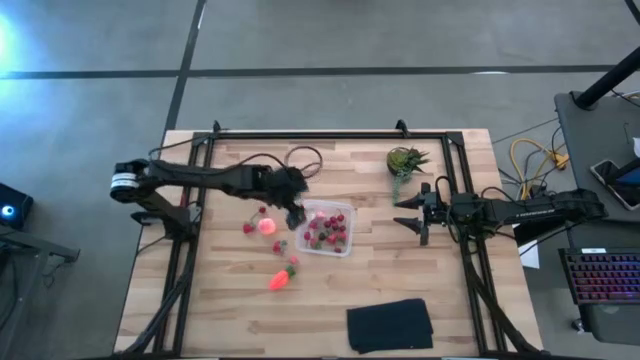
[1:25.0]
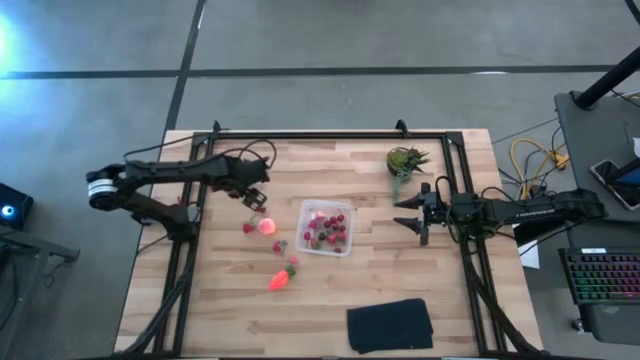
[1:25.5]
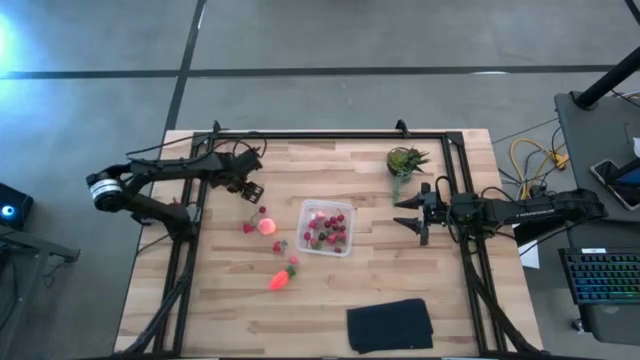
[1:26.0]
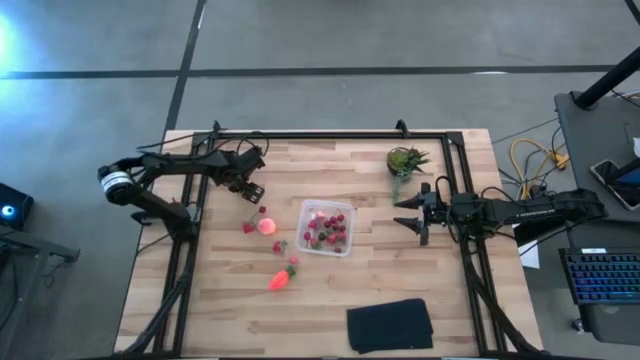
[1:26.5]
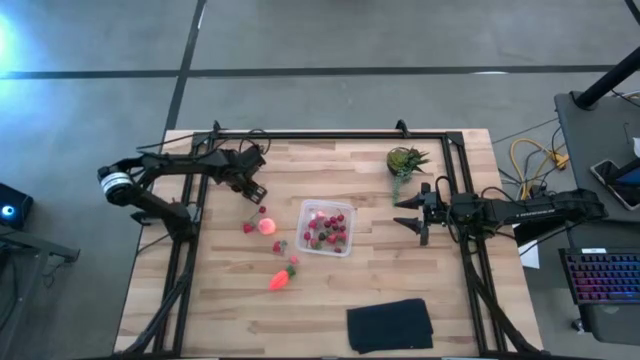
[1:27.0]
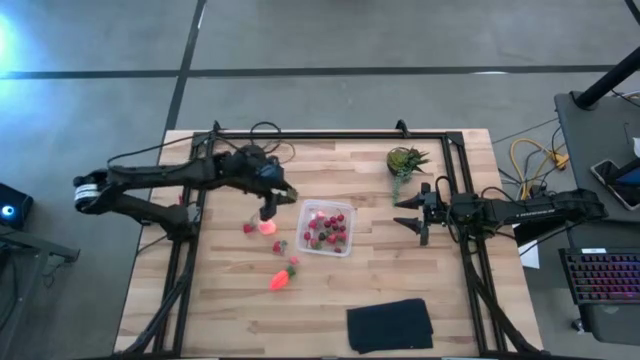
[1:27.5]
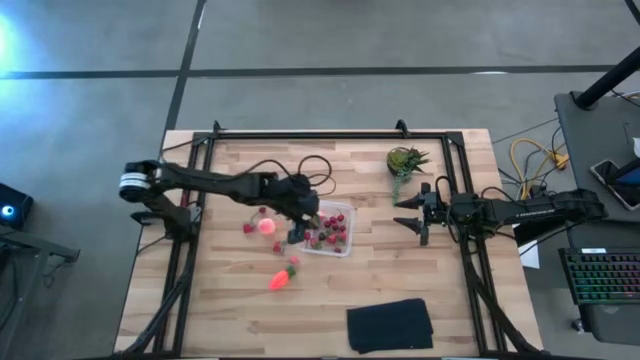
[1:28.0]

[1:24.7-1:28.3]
Task: Pick and placing Produce into tupperware
Put the red strawberry into the transparent bin

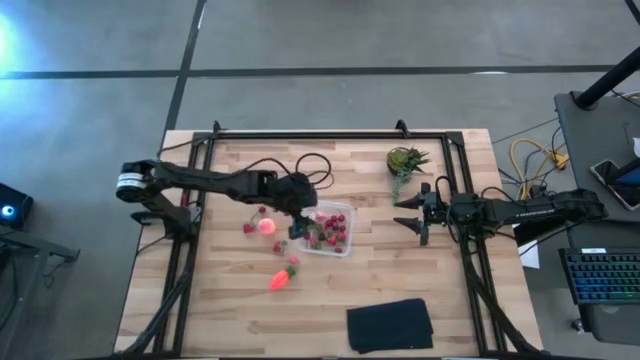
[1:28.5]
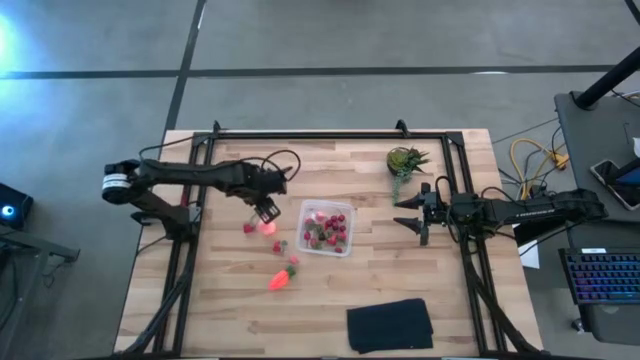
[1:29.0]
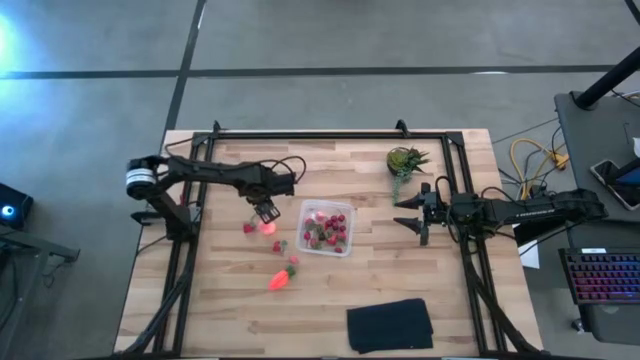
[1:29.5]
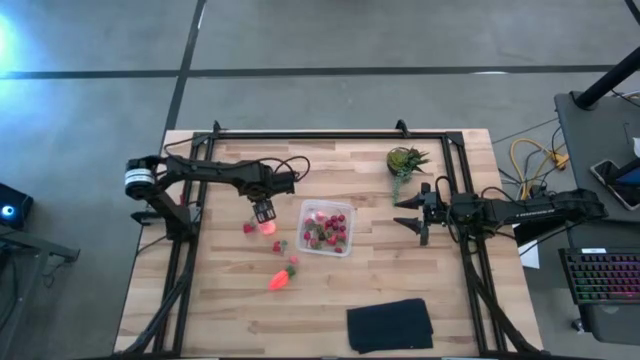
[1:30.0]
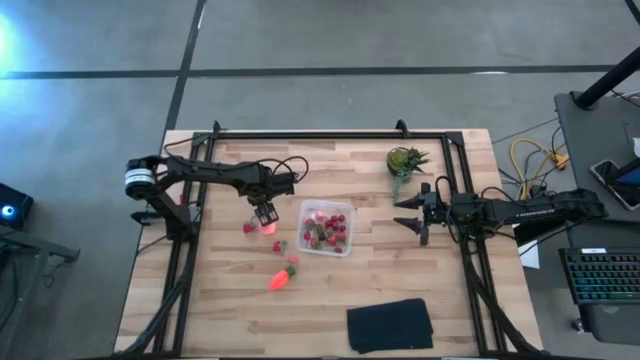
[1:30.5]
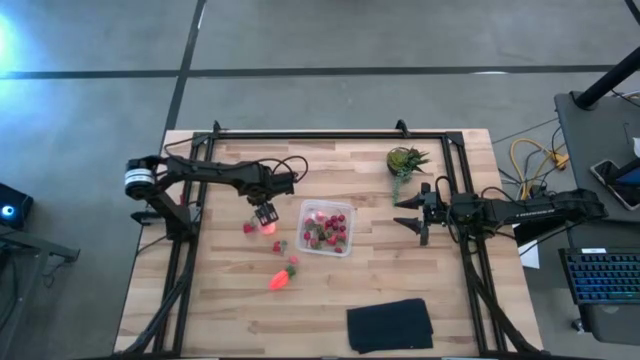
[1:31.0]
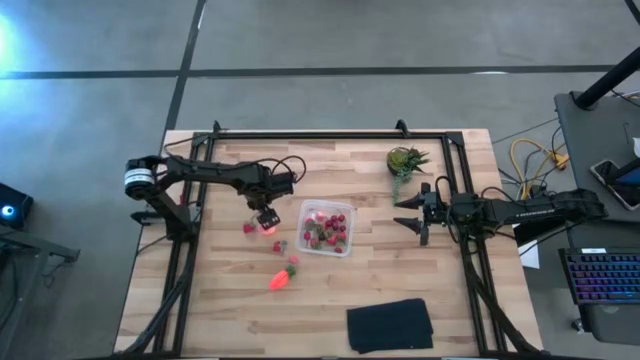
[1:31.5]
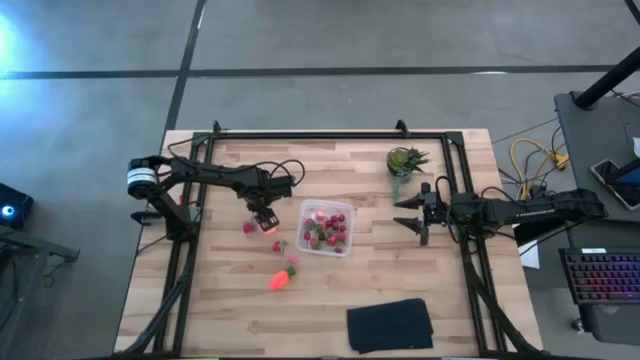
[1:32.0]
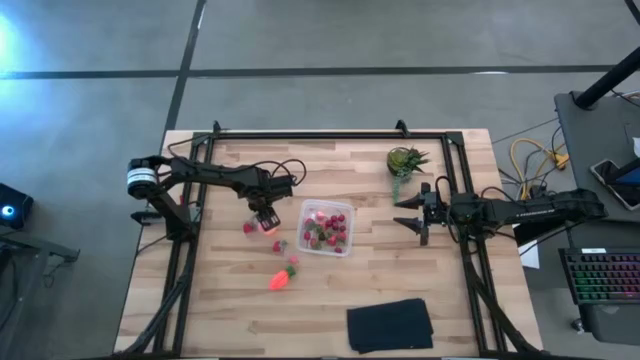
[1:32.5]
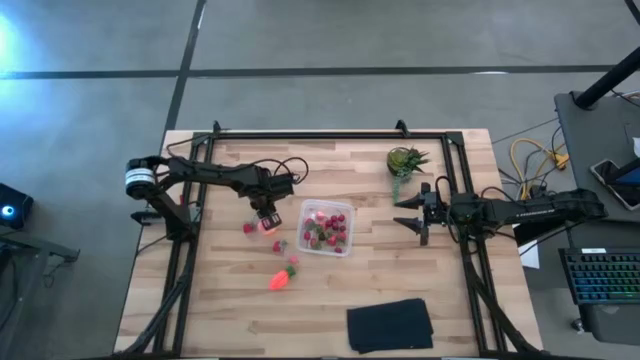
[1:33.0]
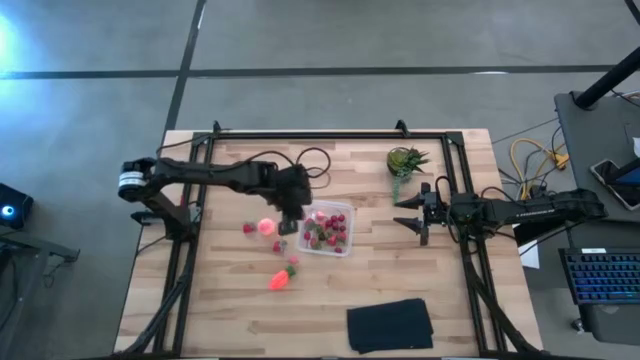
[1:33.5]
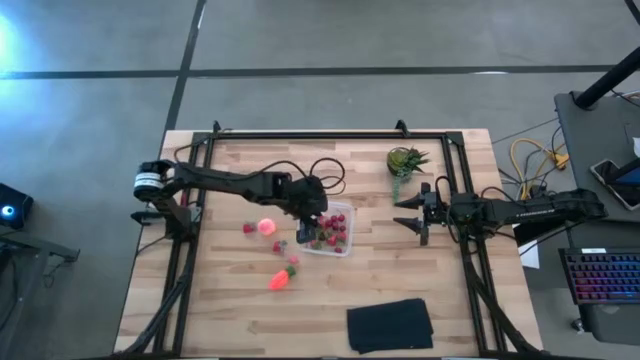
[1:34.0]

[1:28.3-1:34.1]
Put the red cherry into the transparent bin

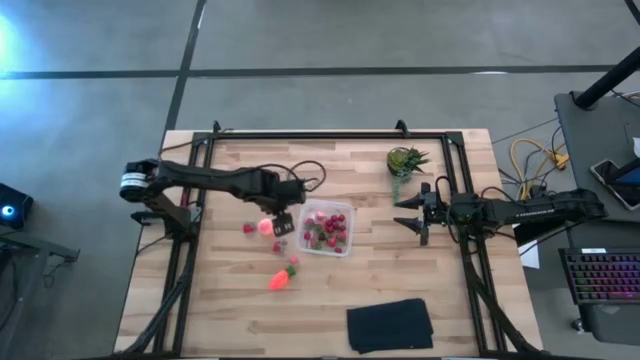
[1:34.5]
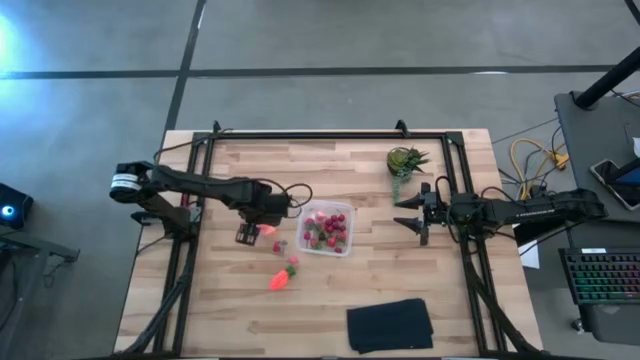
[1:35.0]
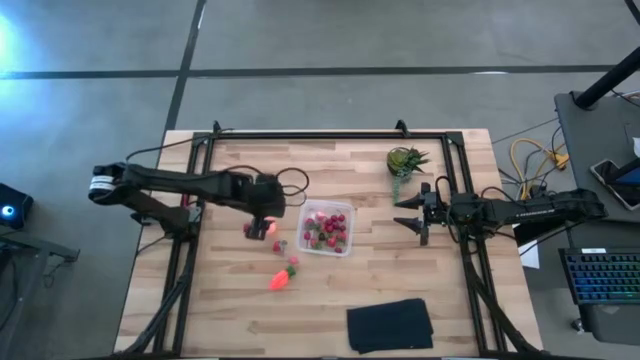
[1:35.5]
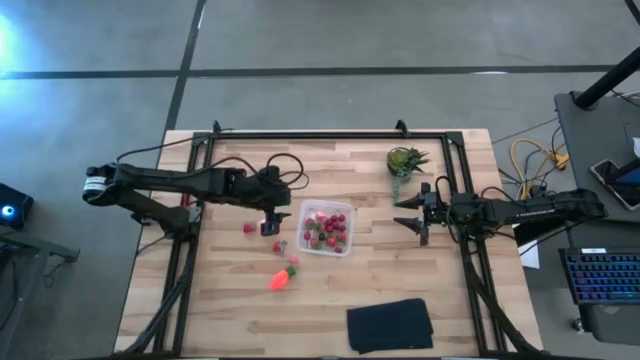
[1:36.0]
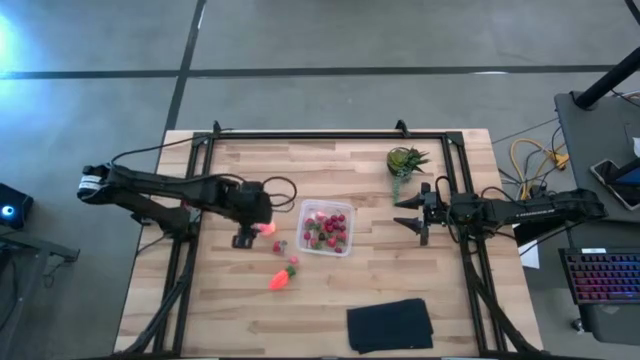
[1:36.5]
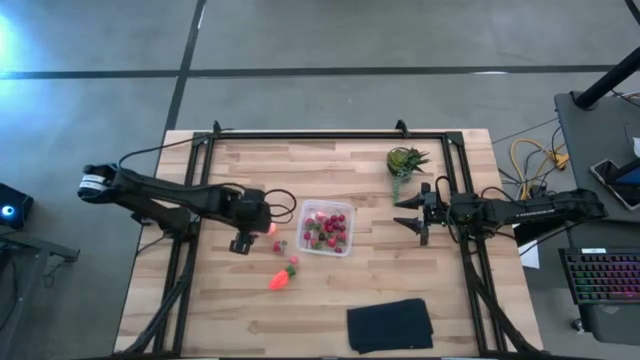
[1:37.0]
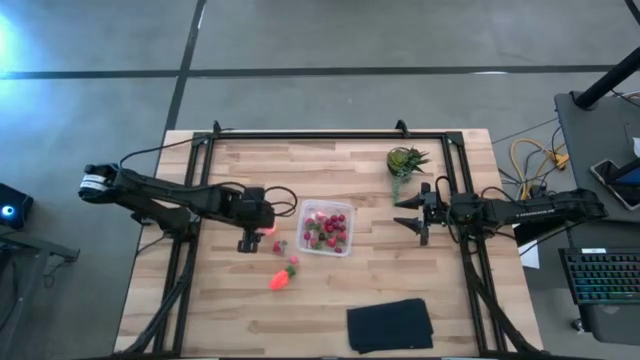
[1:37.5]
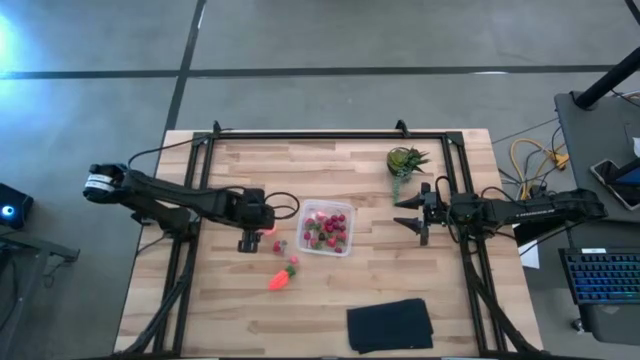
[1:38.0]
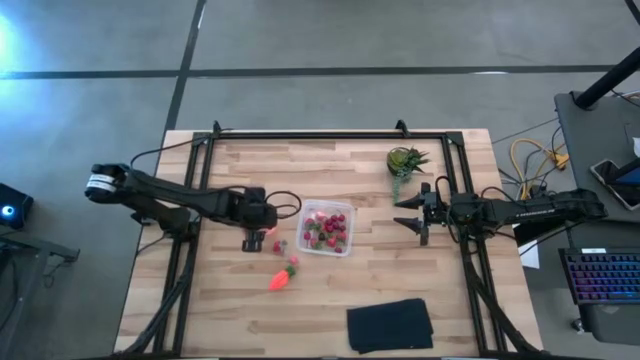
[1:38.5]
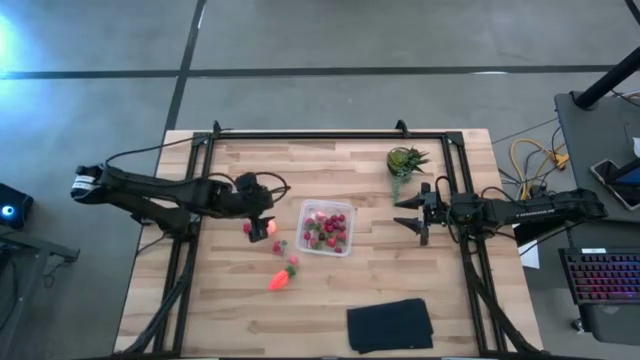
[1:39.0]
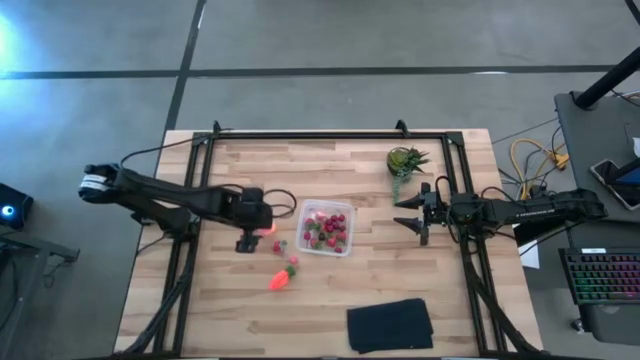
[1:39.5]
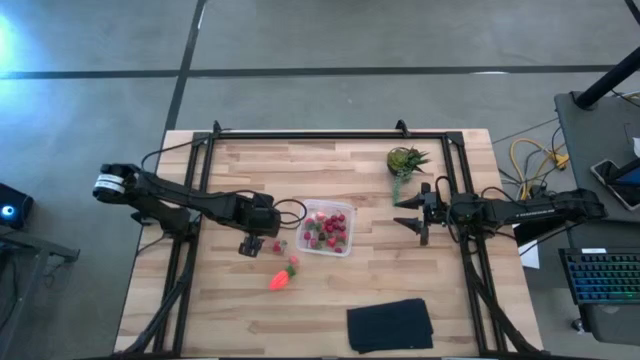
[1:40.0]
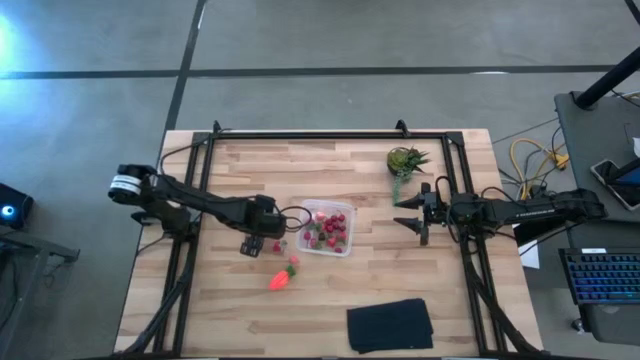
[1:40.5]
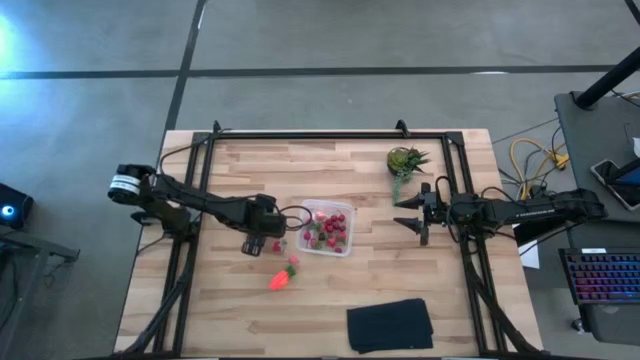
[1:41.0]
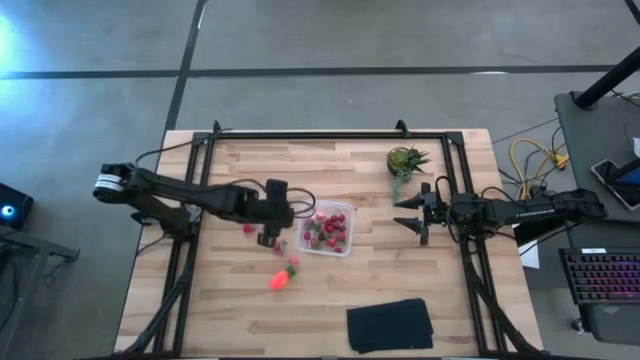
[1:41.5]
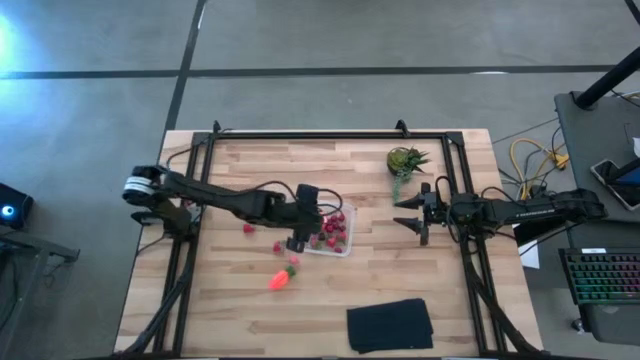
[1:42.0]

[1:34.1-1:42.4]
Put the orange peach into the transparent bin

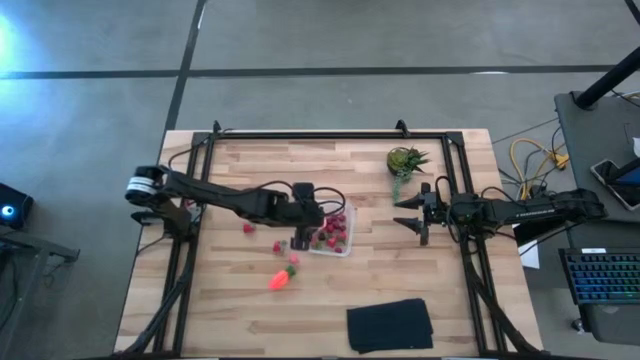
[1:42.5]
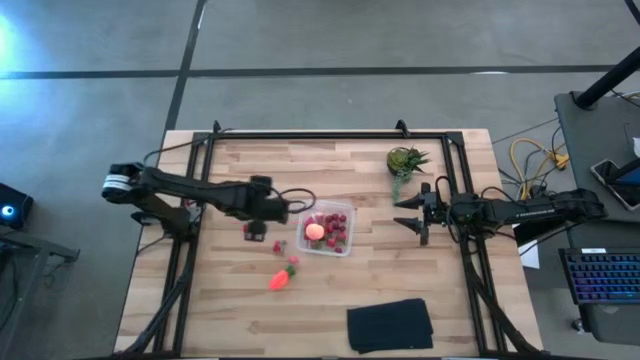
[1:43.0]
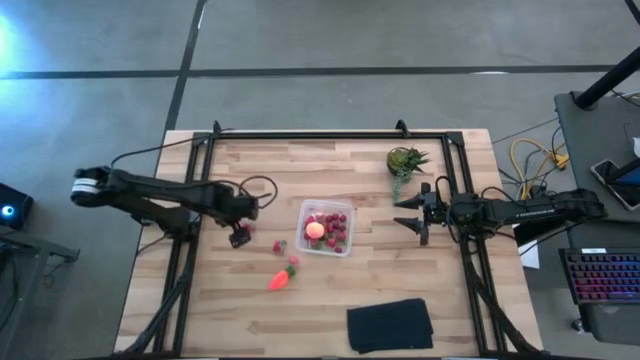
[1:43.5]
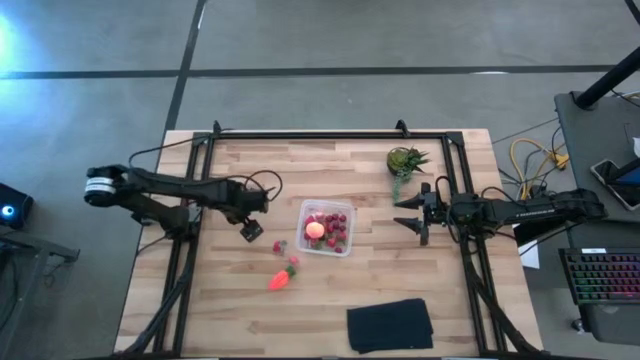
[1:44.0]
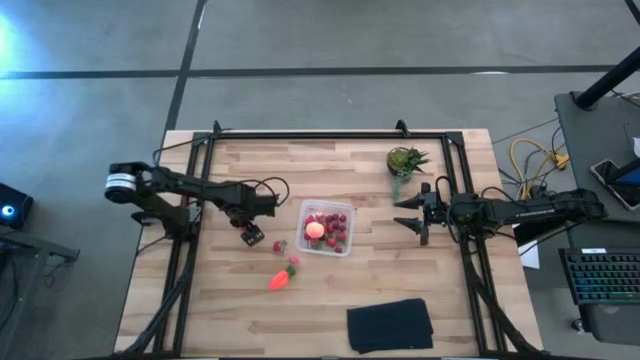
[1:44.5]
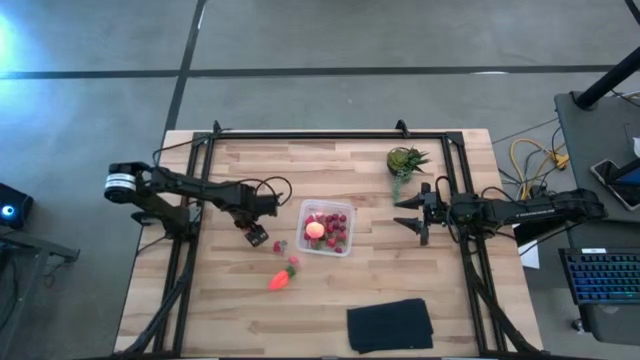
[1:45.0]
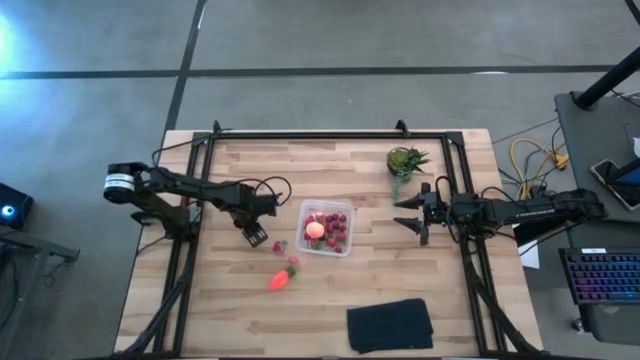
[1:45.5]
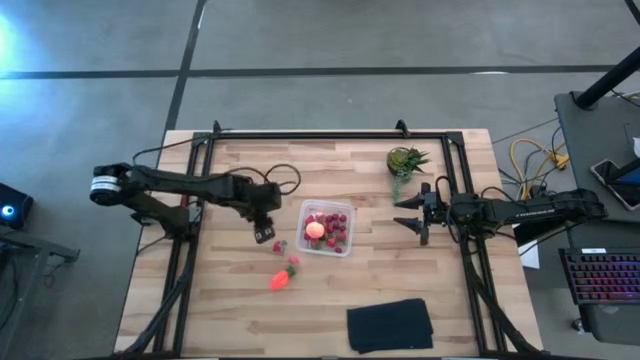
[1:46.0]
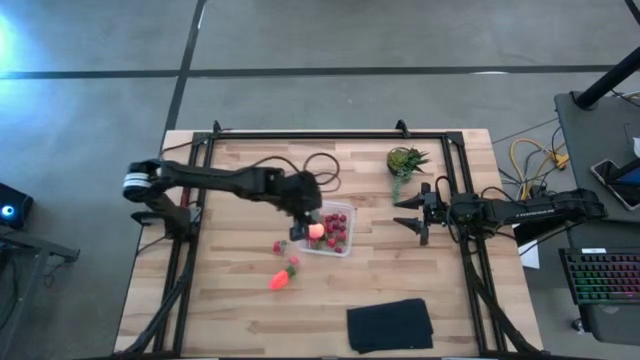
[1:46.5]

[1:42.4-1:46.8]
Put the red strawberry into the transparent bin
